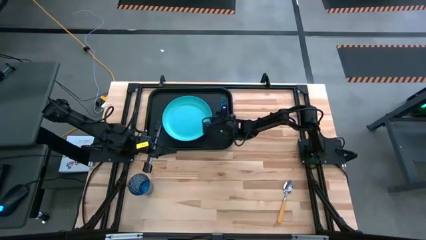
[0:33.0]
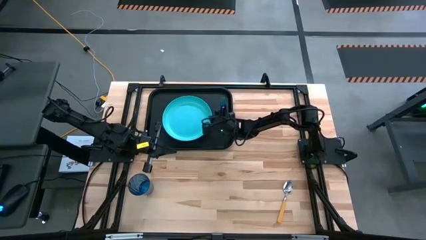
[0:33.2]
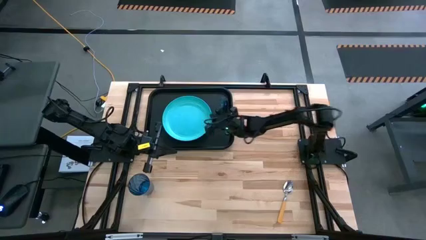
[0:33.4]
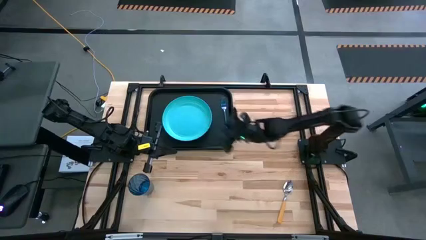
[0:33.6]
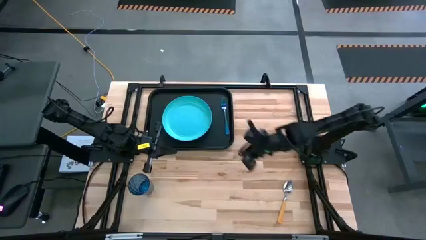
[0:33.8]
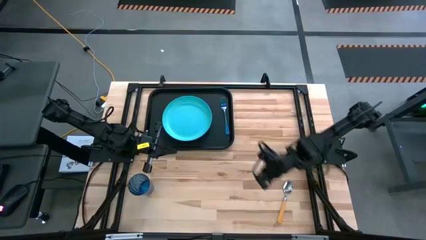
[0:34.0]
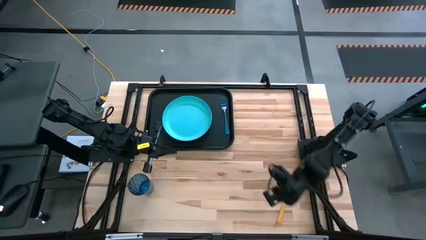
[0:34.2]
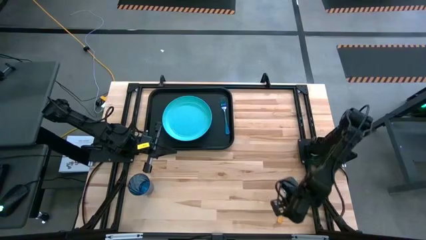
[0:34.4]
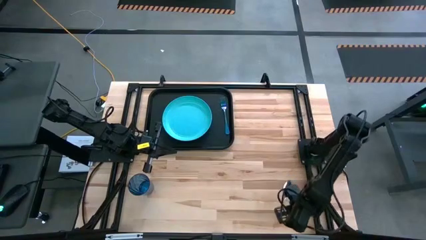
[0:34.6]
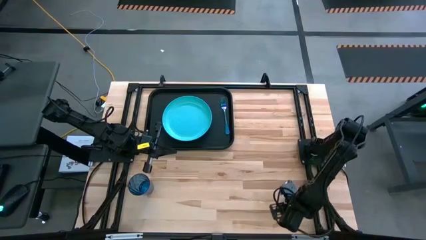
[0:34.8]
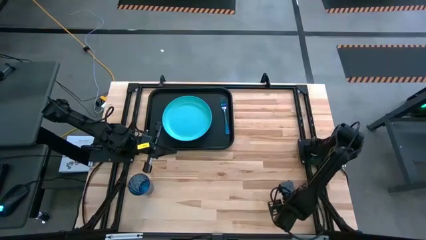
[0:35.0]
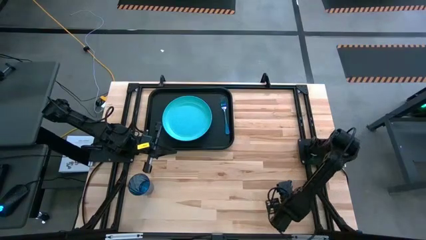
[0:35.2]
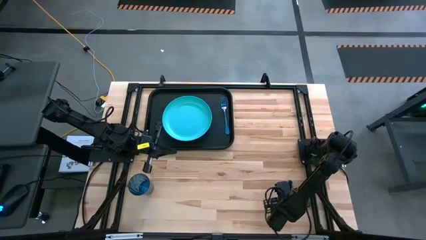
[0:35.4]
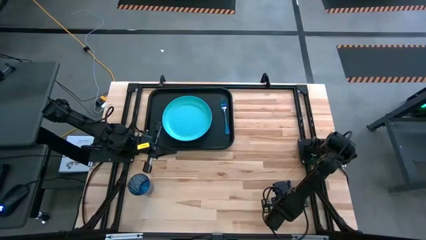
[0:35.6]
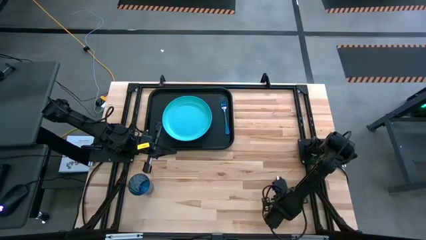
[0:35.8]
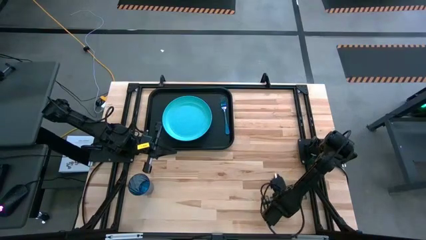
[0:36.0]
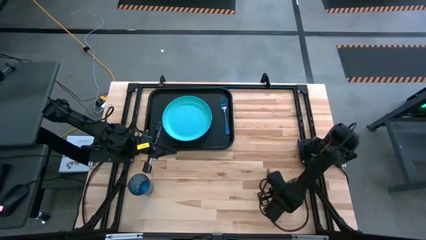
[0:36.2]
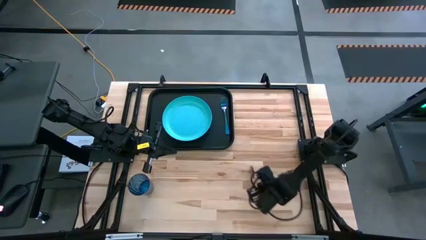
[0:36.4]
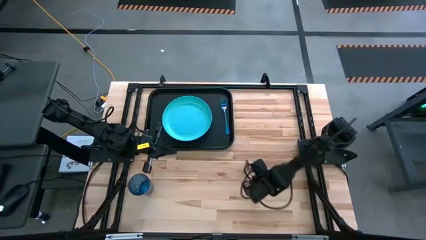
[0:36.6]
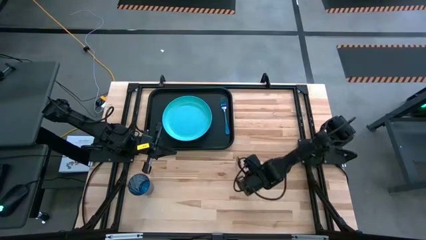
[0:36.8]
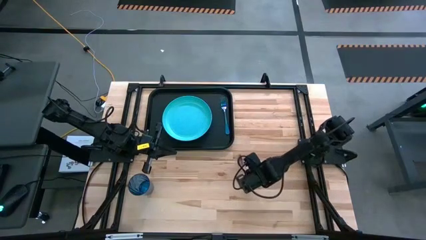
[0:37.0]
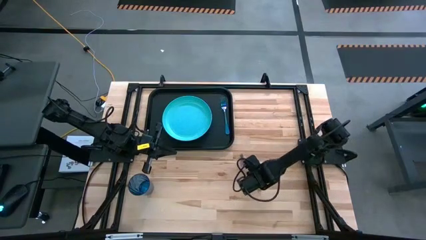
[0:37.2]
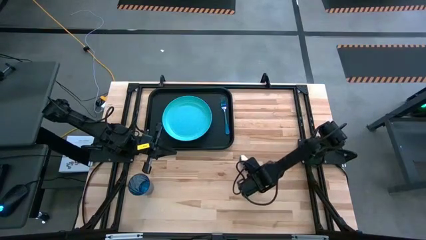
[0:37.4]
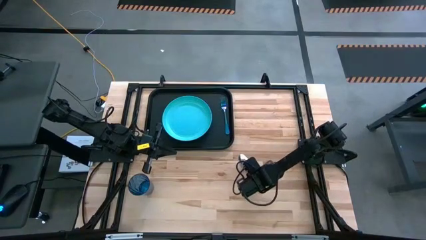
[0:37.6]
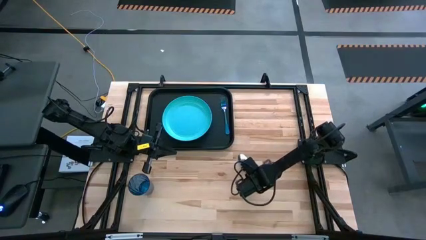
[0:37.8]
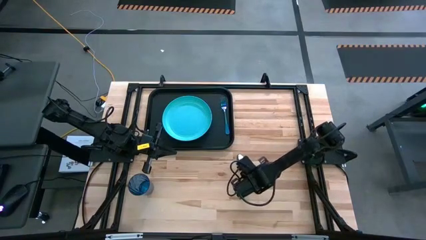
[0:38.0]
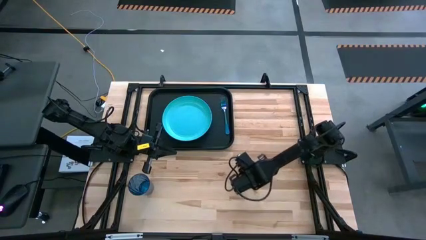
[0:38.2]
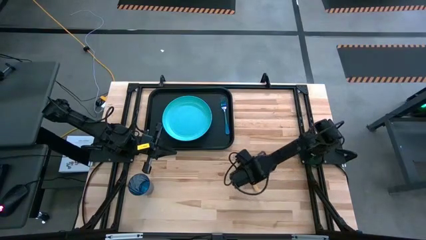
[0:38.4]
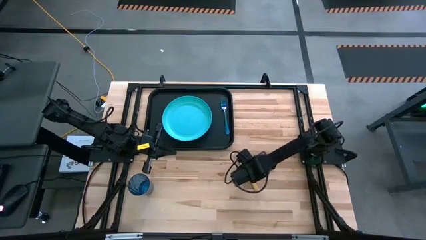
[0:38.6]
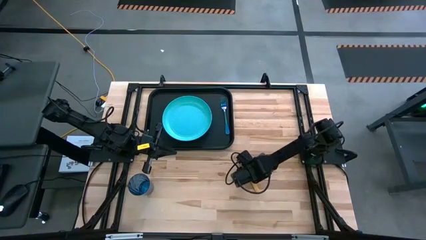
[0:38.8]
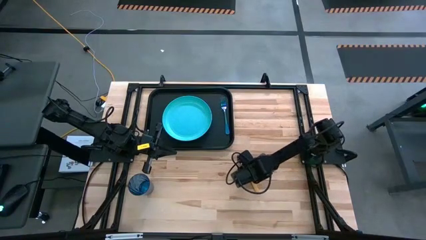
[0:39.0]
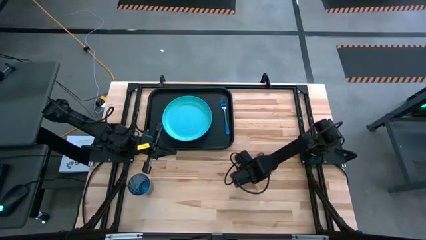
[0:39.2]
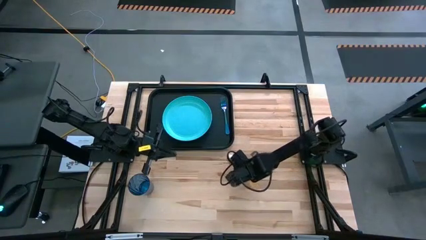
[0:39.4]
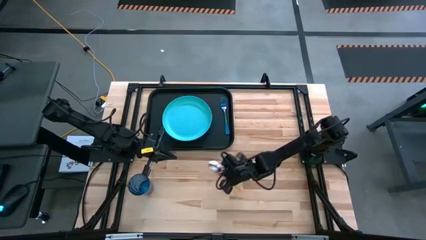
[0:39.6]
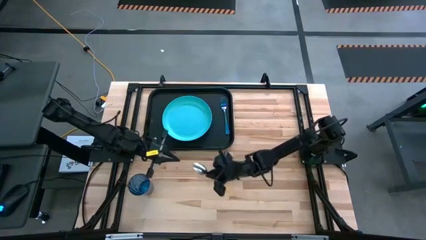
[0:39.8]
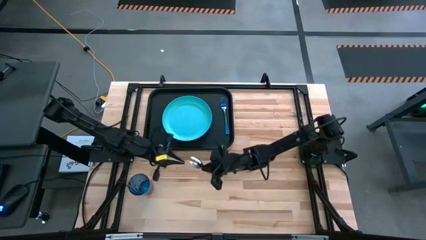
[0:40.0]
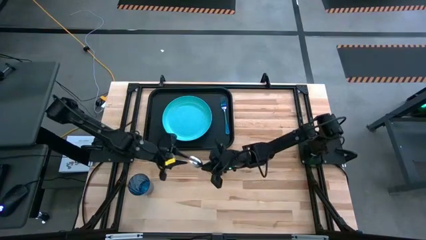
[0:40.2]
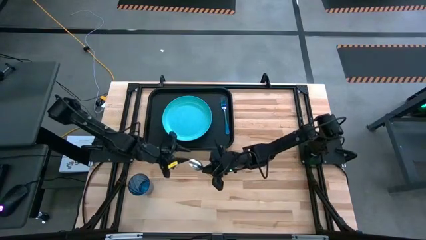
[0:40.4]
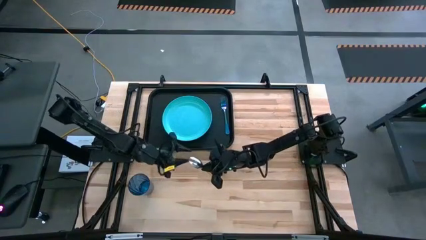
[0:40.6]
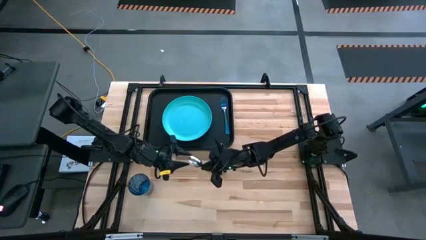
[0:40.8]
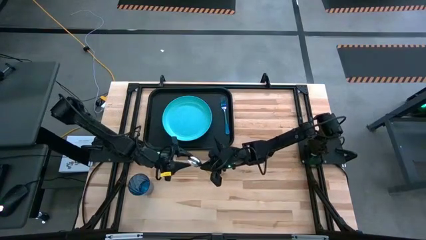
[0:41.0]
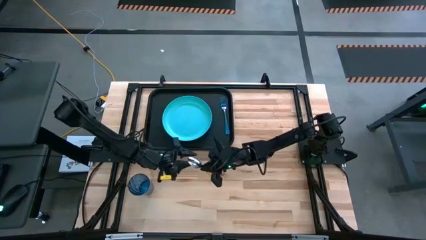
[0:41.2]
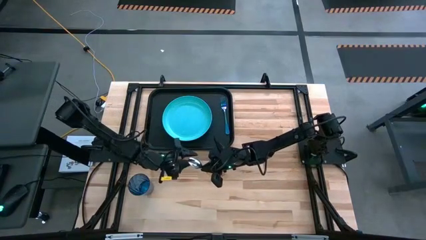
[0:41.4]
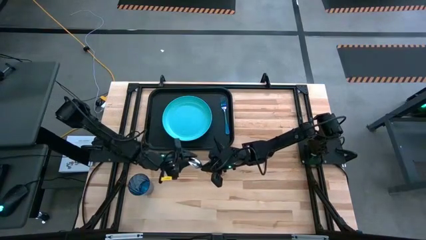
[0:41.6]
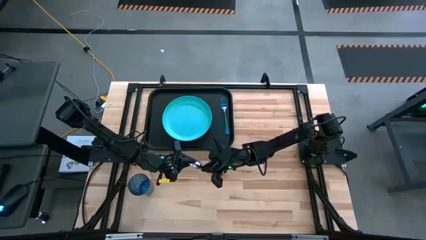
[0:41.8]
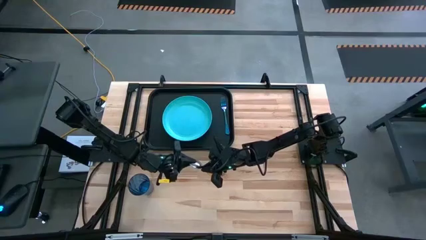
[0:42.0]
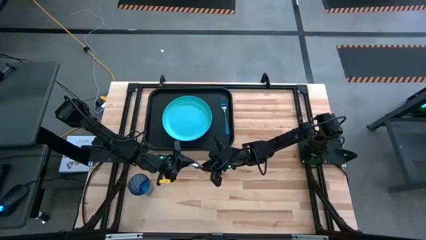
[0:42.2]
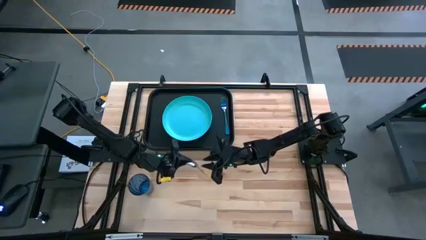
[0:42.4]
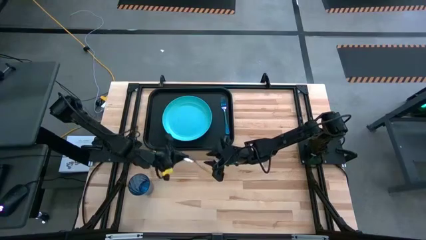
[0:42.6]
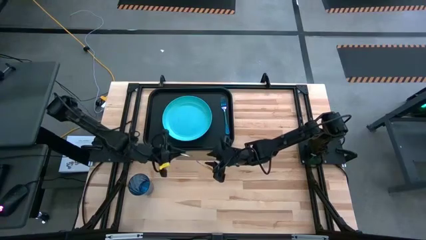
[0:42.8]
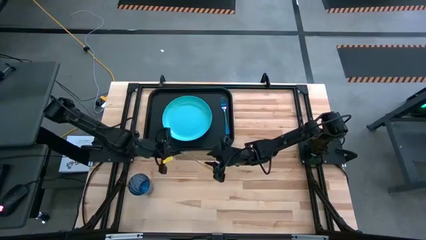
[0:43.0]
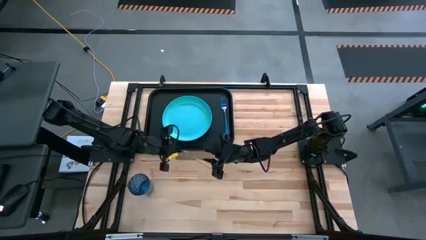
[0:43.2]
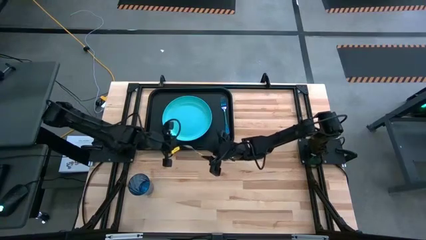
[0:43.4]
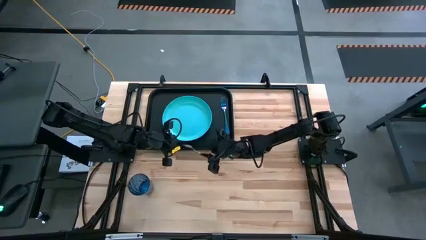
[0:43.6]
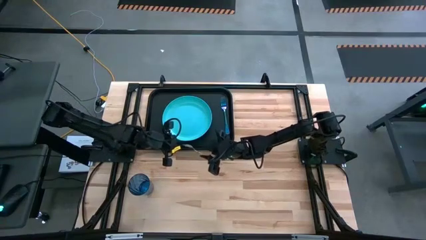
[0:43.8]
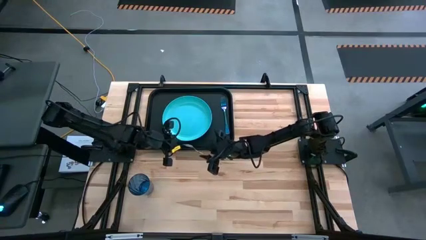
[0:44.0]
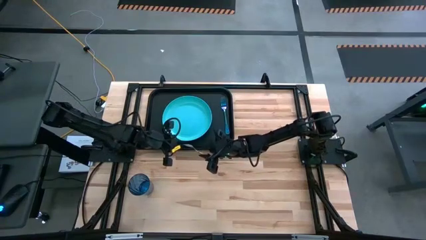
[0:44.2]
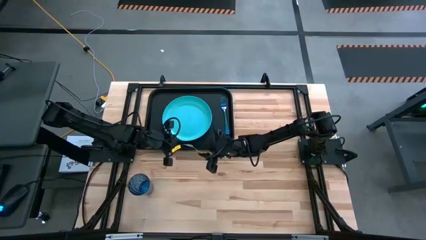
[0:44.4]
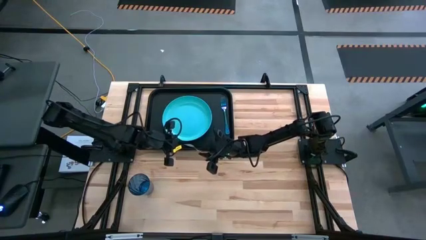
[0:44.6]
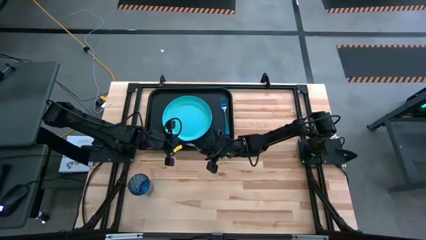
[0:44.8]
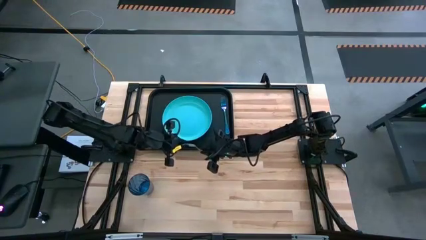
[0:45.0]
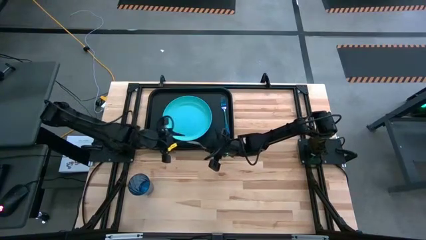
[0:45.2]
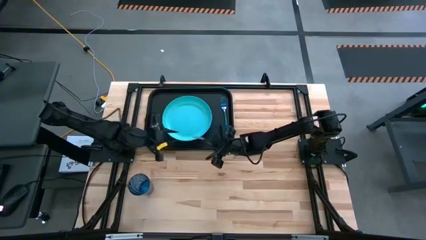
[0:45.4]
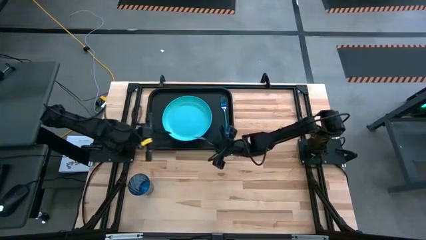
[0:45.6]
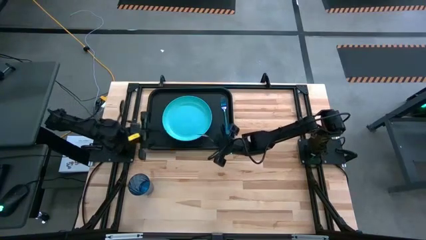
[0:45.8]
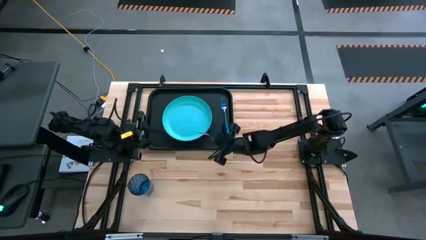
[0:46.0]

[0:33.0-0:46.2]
Task: Pick and place plate/cup/fork/spoon on tray
Put the orange spoon on the black serving tray beside the blue fork

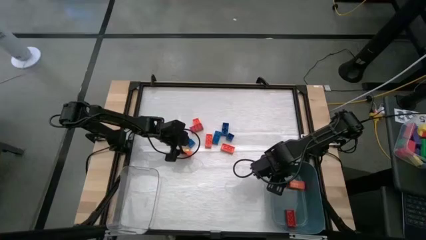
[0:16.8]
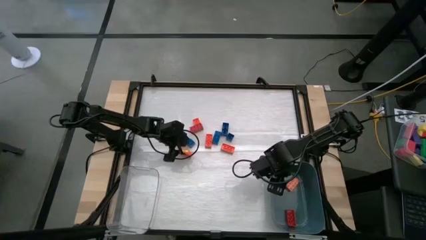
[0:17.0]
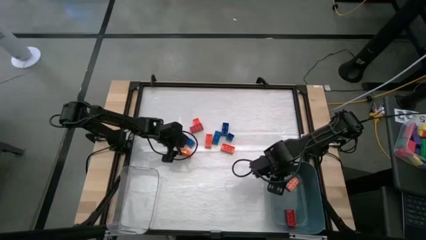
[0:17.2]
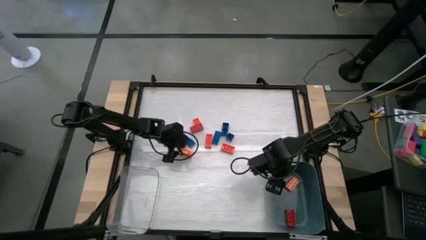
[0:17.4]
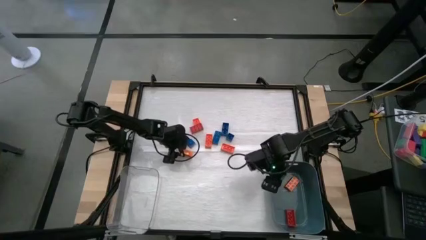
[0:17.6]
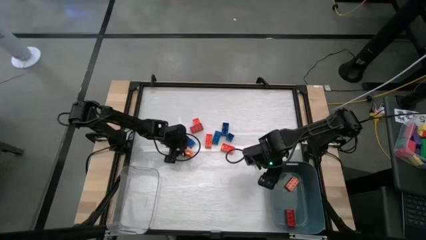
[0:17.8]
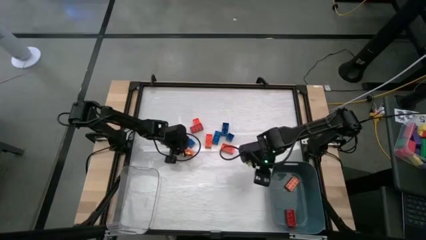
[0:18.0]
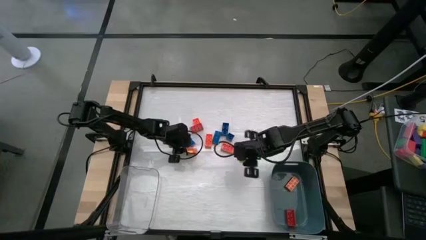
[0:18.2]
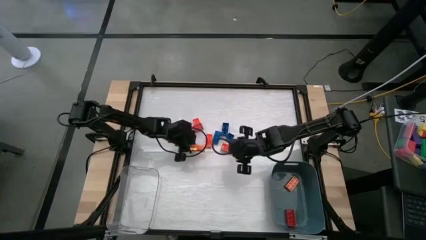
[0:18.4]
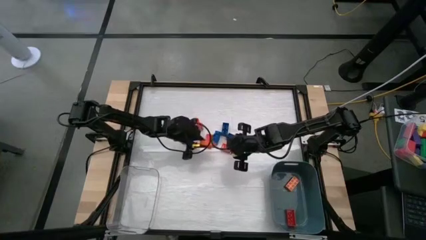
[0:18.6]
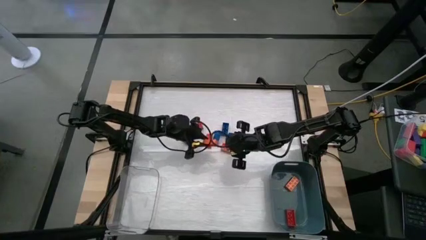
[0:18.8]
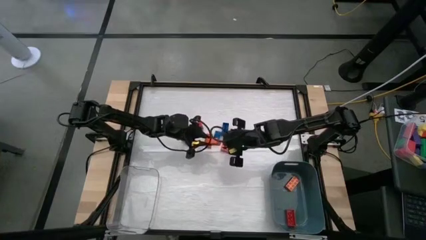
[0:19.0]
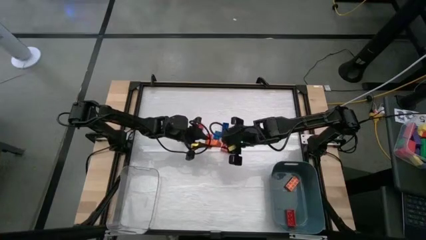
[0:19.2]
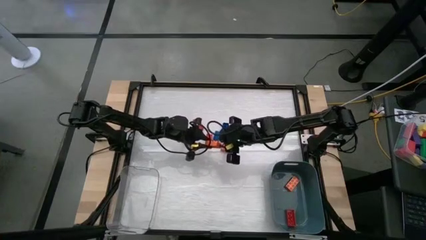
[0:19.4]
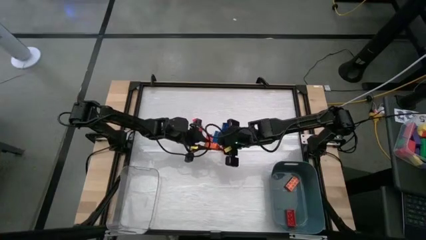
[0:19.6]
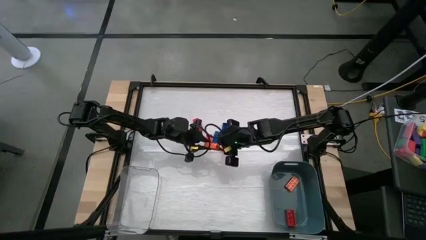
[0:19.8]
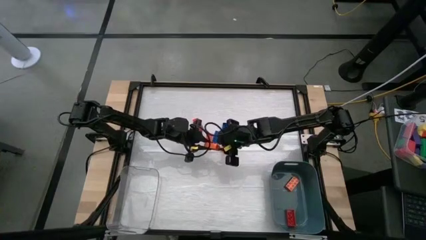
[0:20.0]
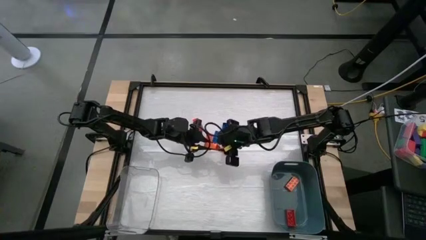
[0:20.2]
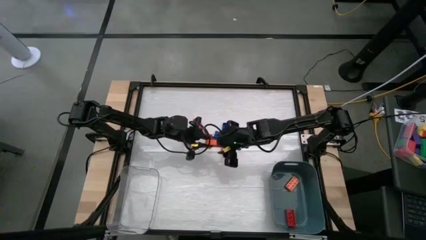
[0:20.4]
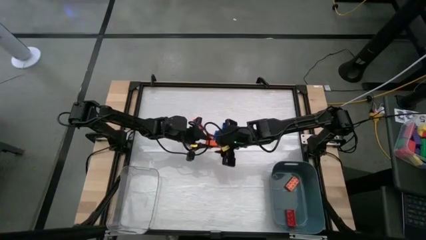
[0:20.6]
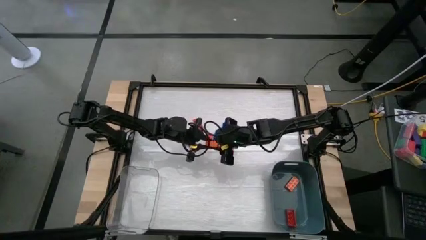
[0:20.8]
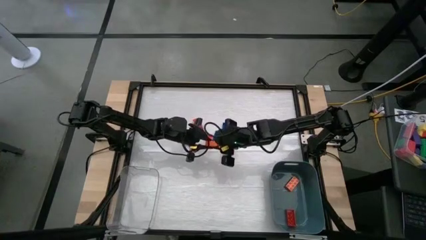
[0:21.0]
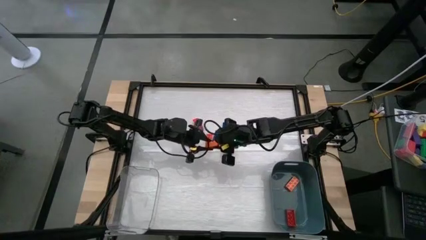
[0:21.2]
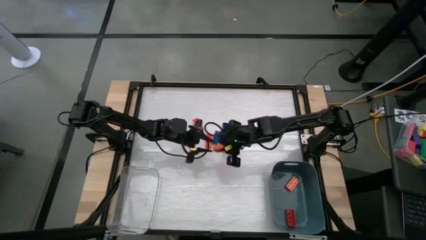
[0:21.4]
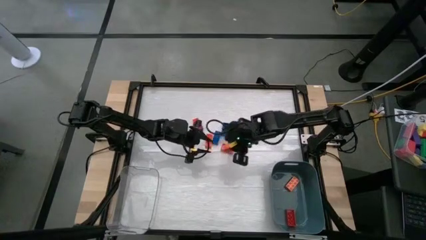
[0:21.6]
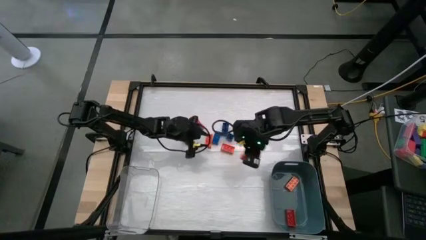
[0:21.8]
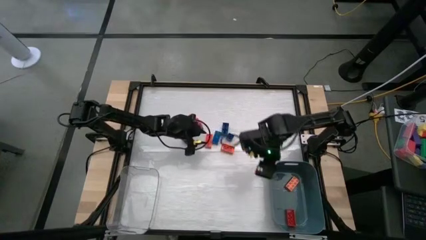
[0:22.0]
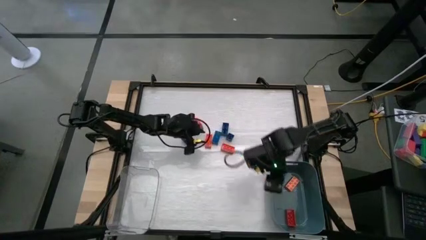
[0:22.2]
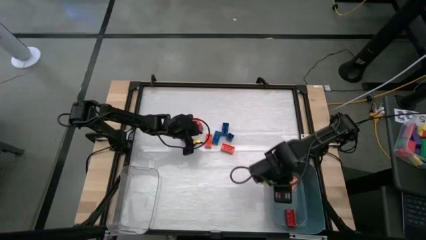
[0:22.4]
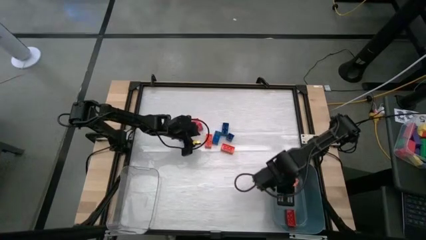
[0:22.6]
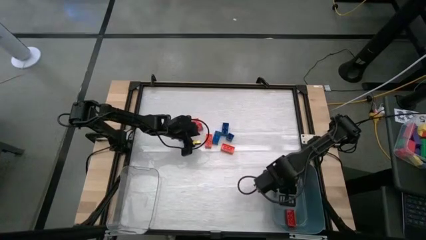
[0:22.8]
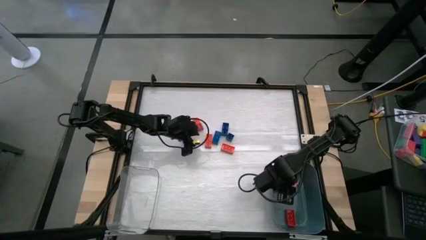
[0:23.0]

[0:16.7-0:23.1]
Task: Sort blocks by size
Put the large orange game piece into the blue bin
